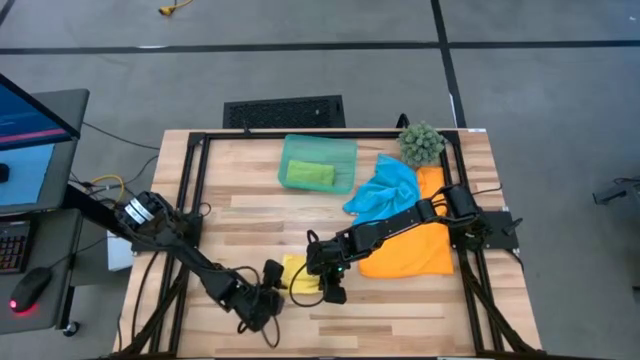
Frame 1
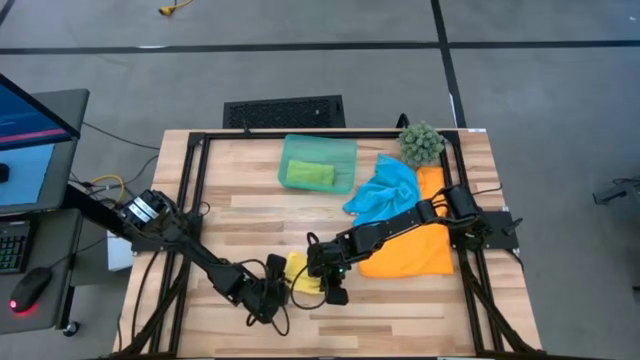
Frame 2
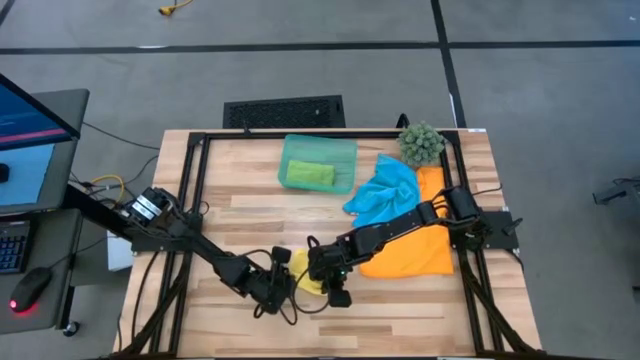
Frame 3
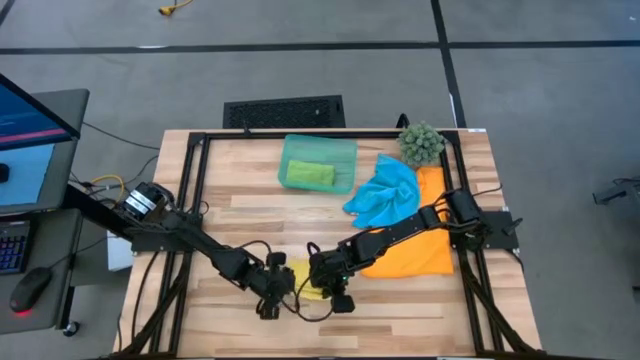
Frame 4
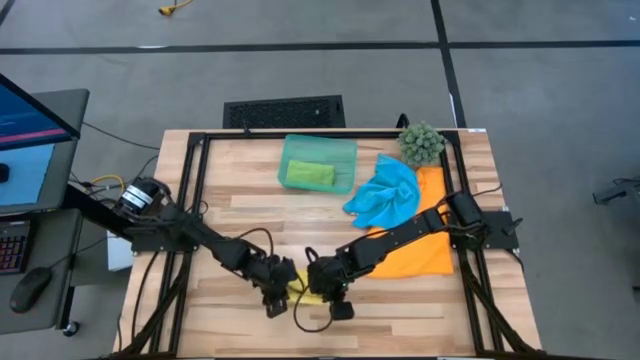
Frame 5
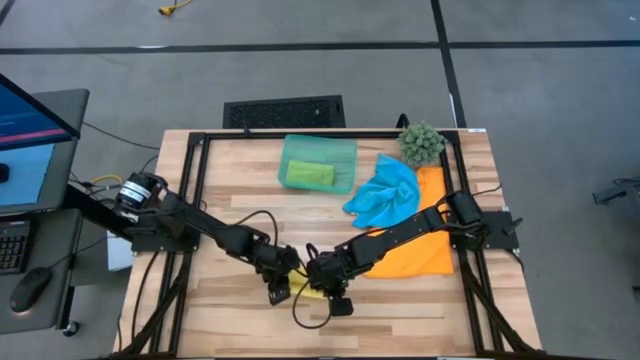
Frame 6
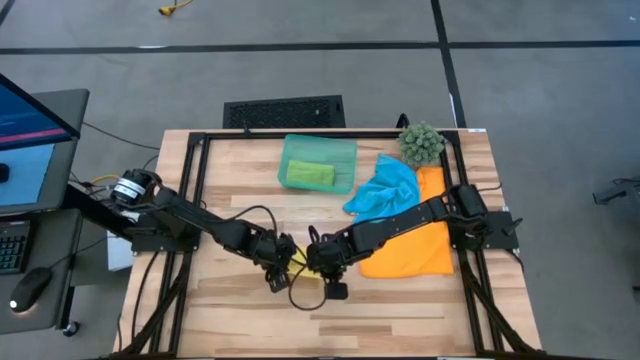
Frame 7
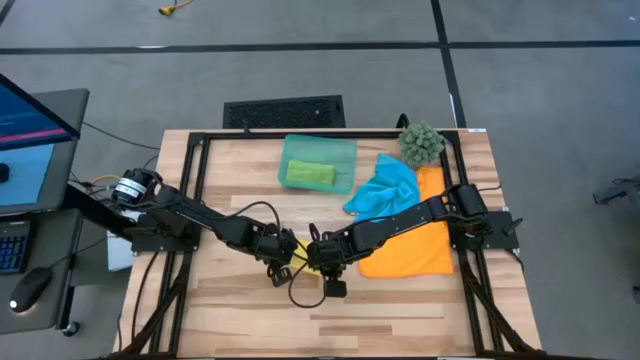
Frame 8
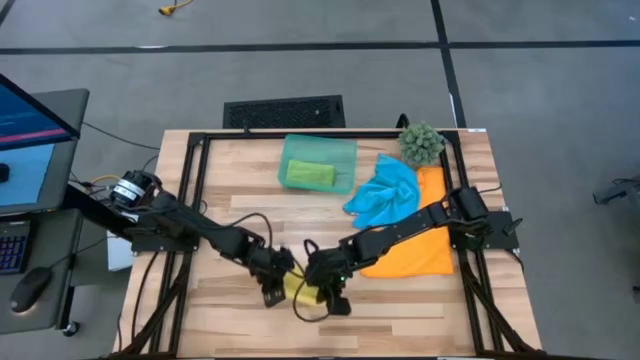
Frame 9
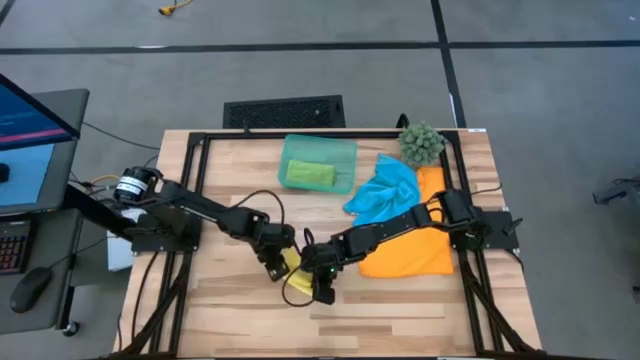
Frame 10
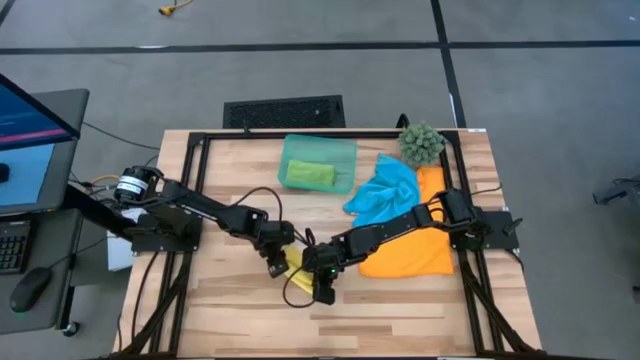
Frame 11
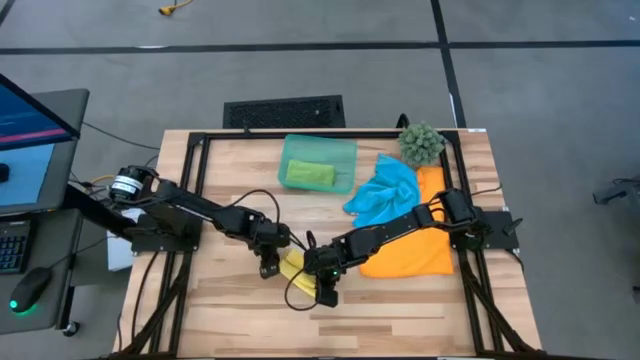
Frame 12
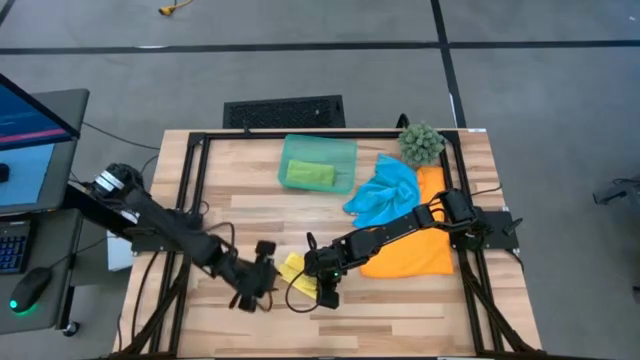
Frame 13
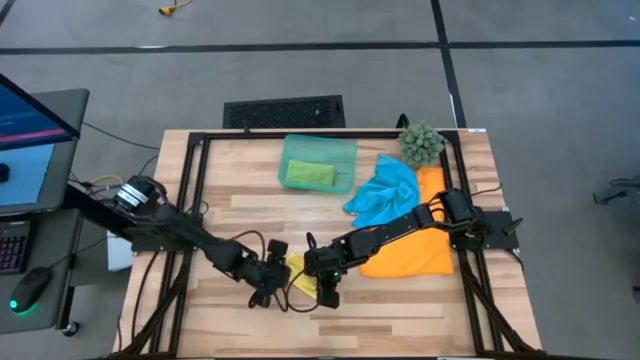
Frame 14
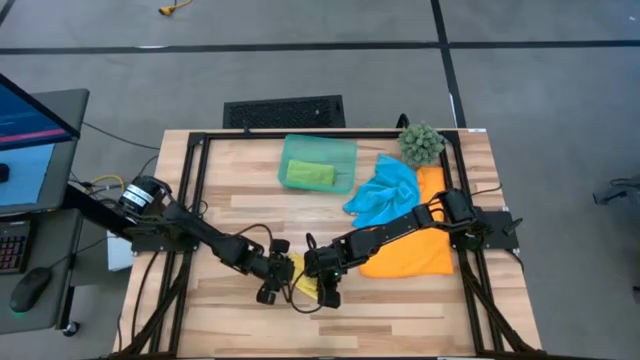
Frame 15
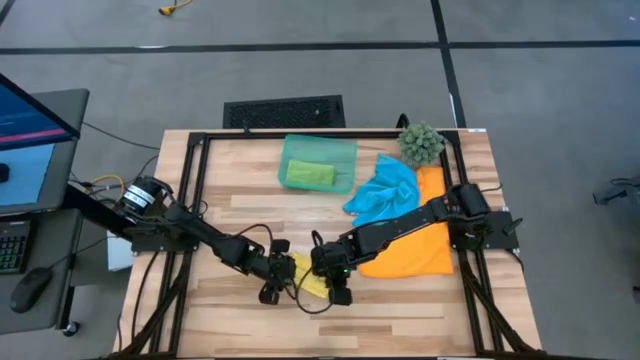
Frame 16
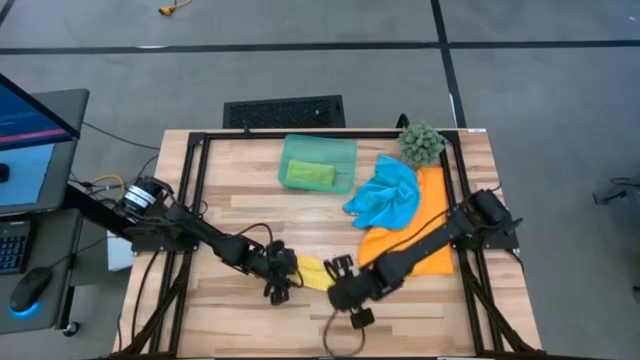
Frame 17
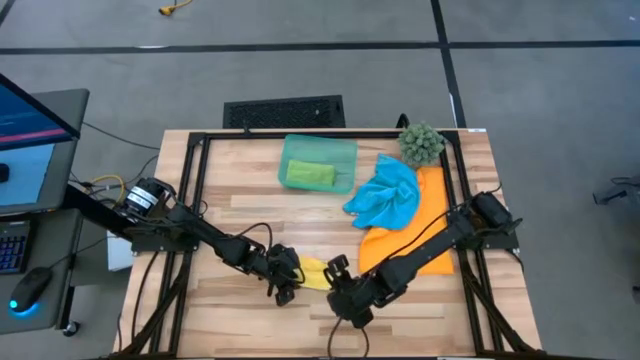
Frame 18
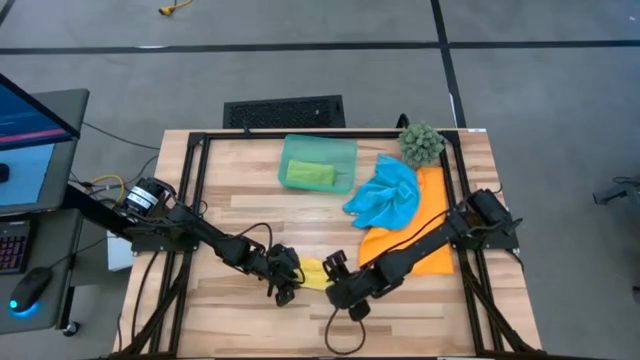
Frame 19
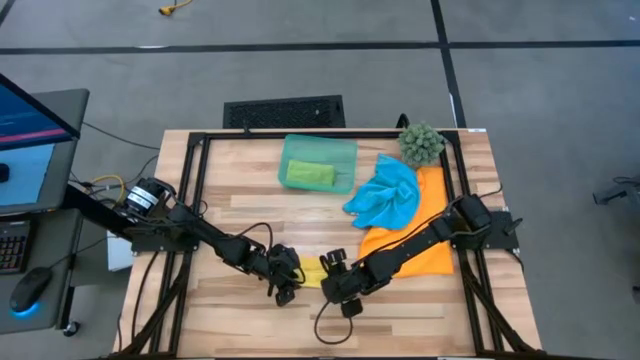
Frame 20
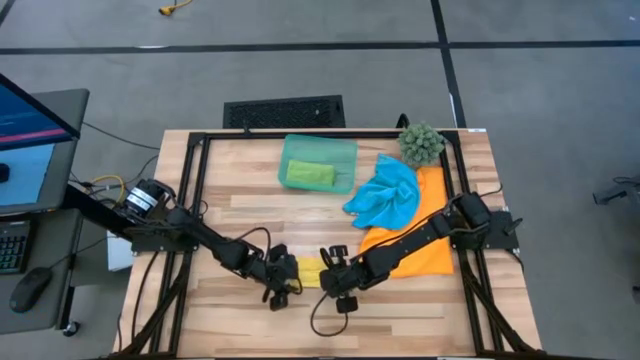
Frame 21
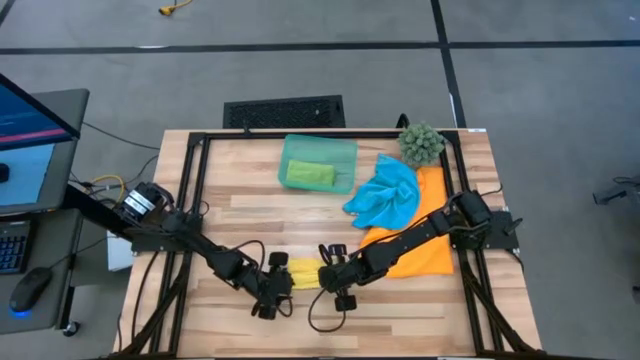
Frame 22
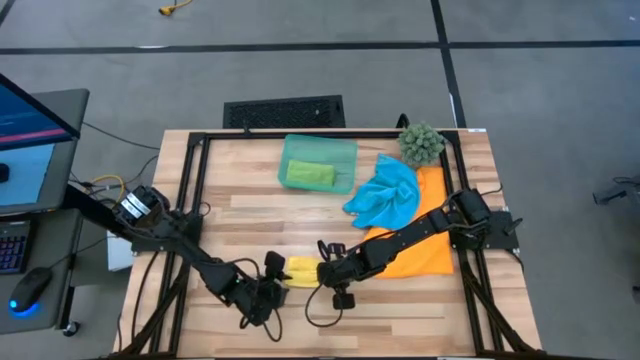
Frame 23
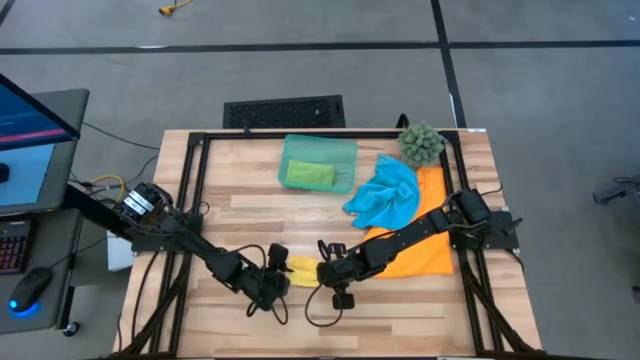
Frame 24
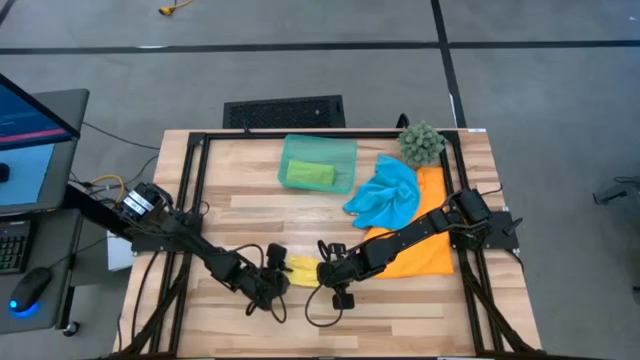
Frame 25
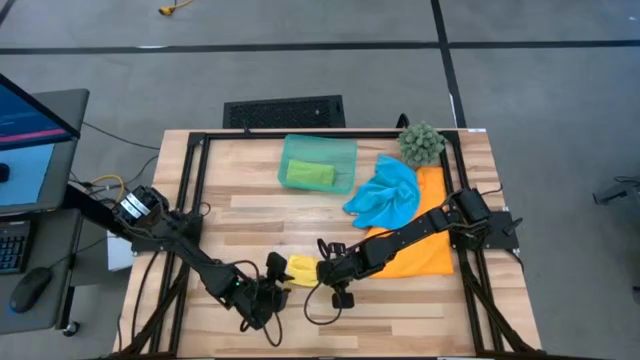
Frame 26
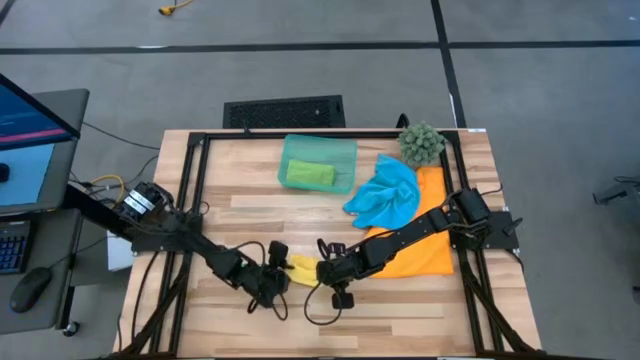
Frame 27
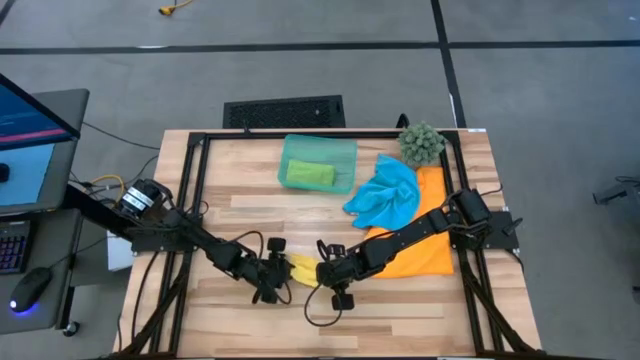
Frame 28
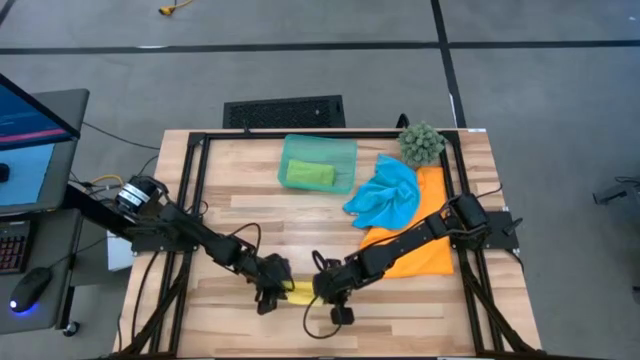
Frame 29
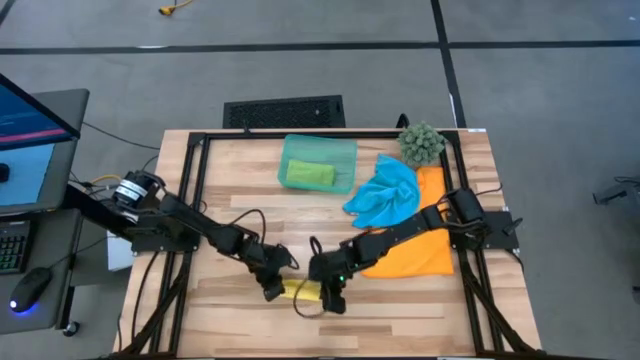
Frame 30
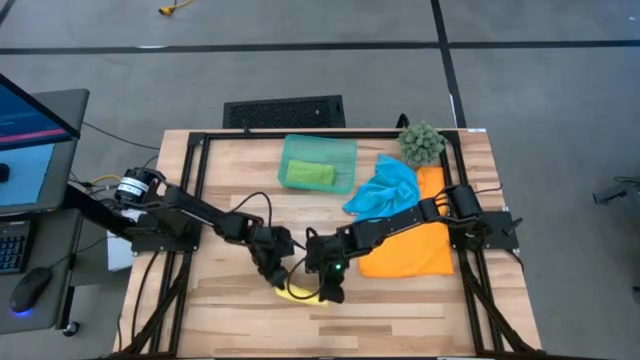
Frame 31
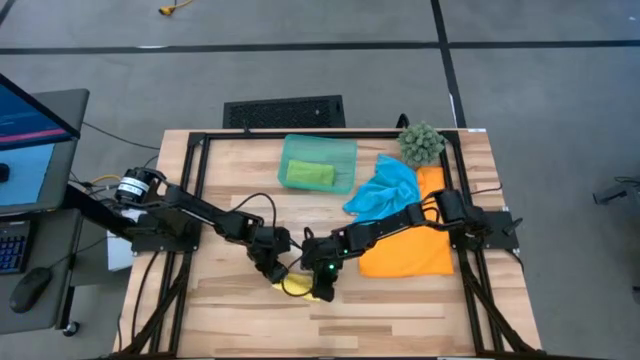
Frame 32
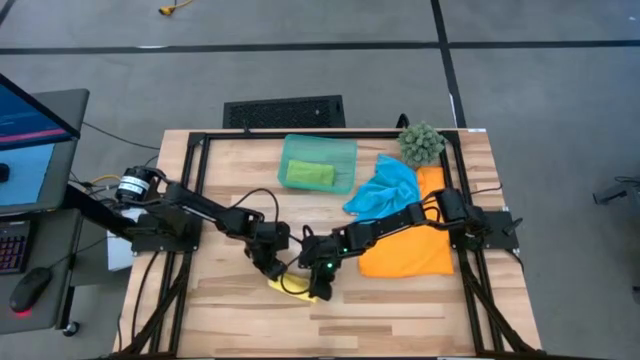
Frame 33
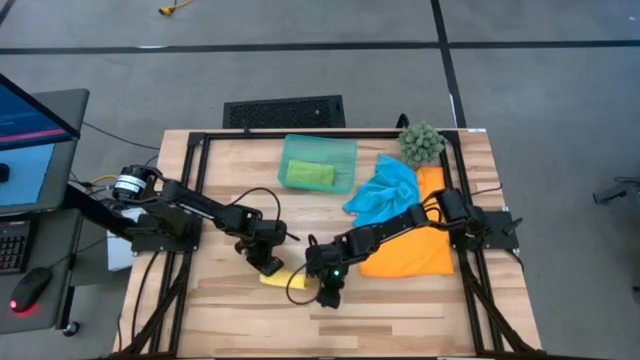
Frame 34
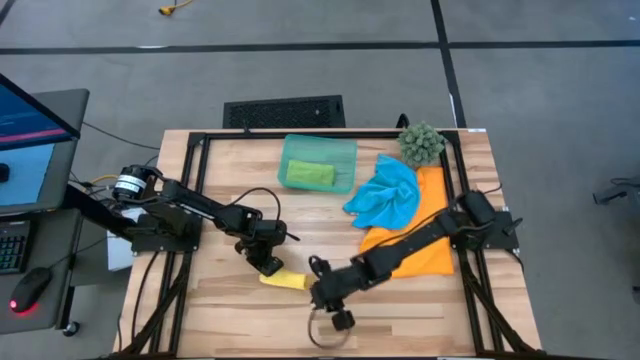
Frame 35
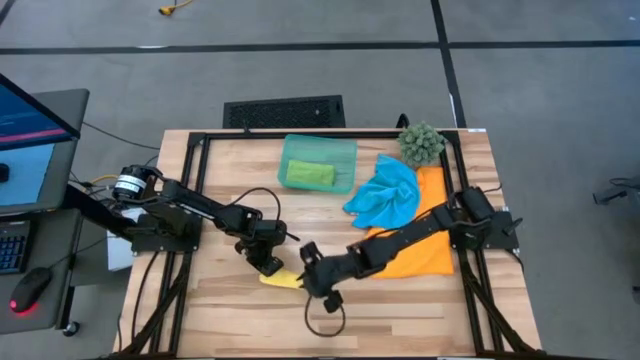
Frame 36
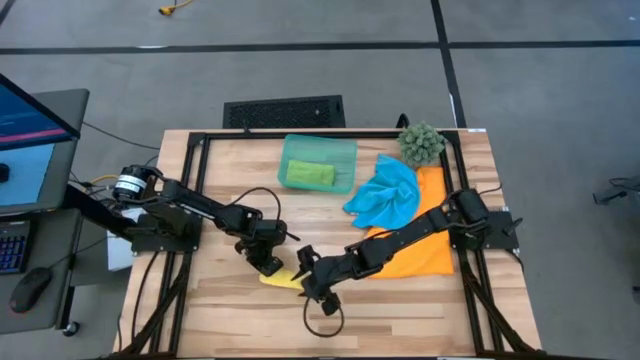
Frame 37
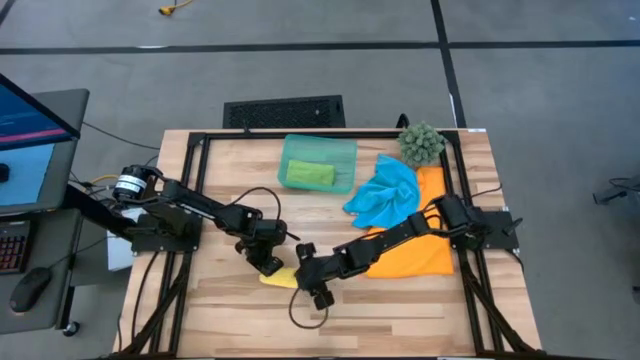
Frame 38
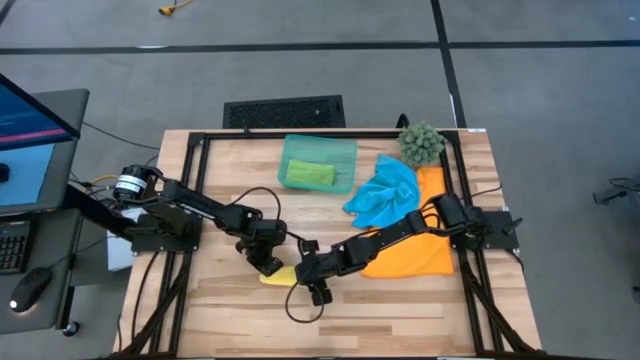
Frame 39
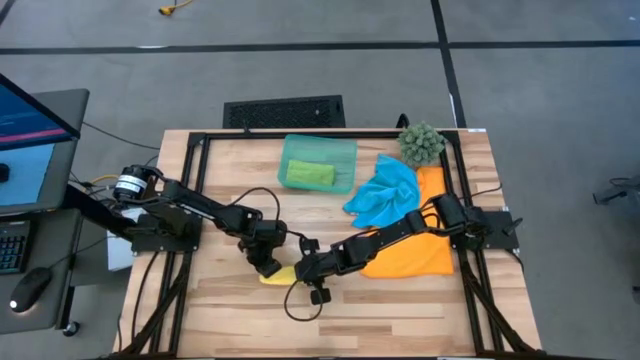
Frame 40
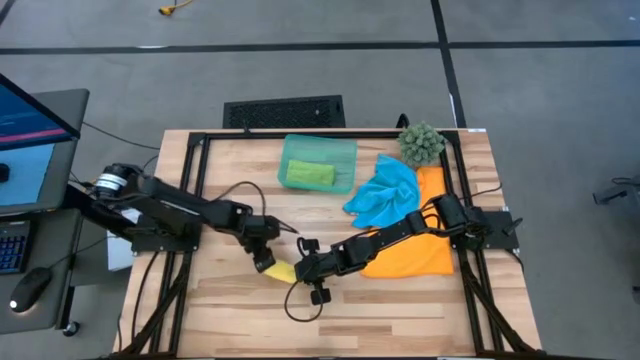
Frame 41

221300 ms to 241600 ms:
Task: Roll microfiber towels into tight, uniform cylinder then place into a basket
Roll the yellow microfiber cloth
